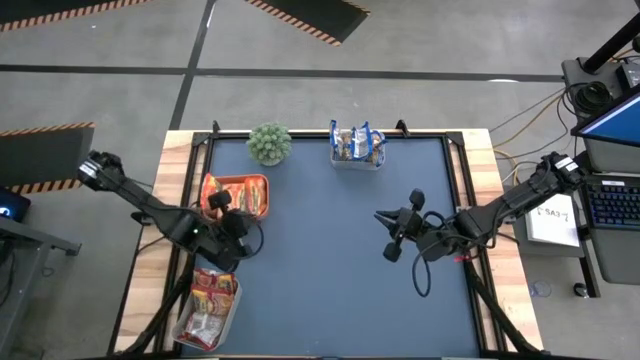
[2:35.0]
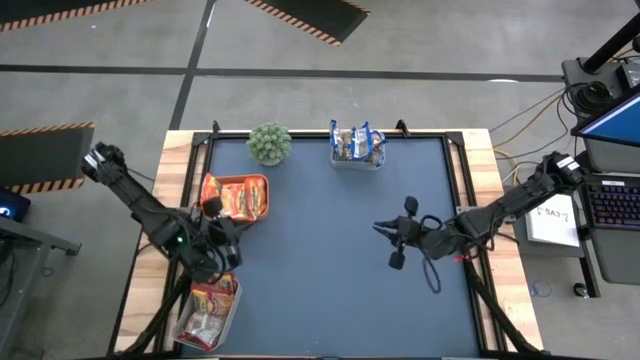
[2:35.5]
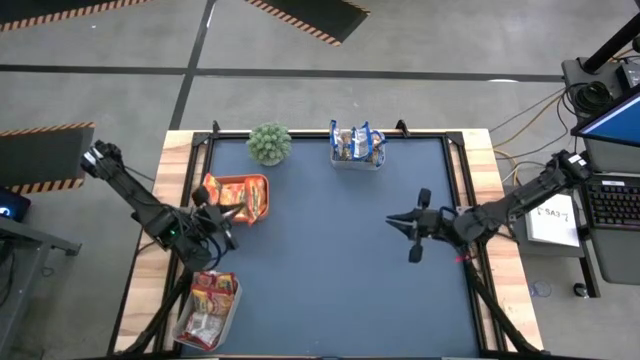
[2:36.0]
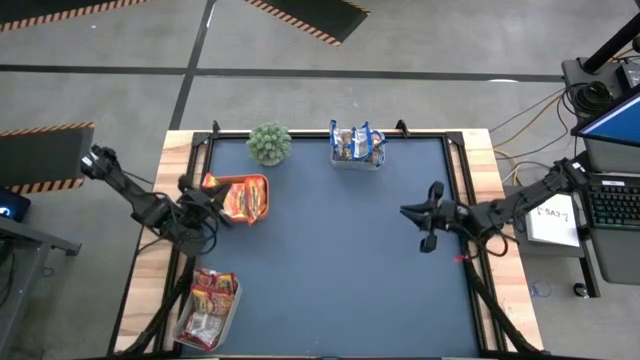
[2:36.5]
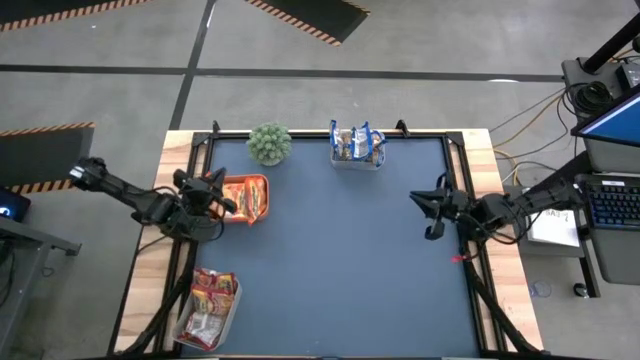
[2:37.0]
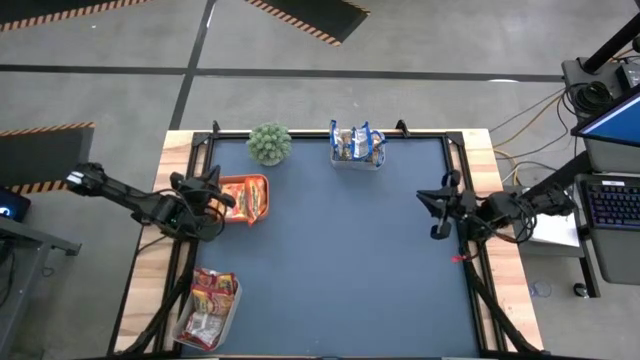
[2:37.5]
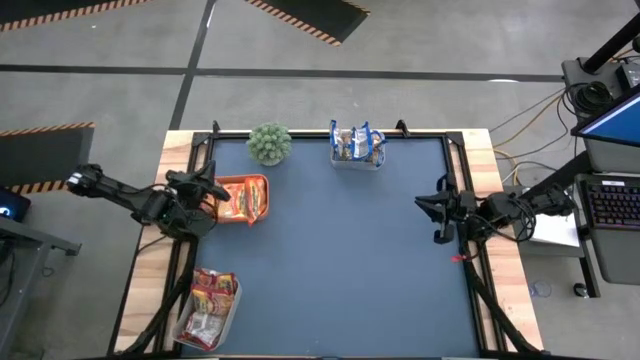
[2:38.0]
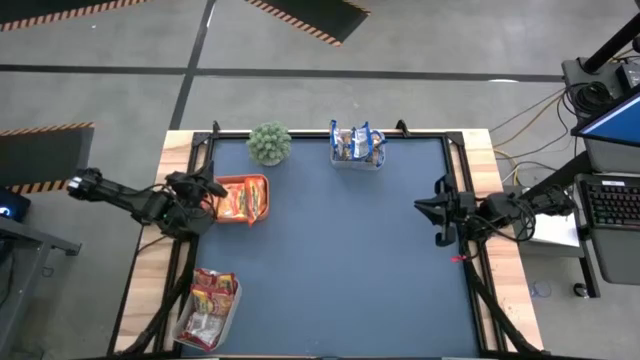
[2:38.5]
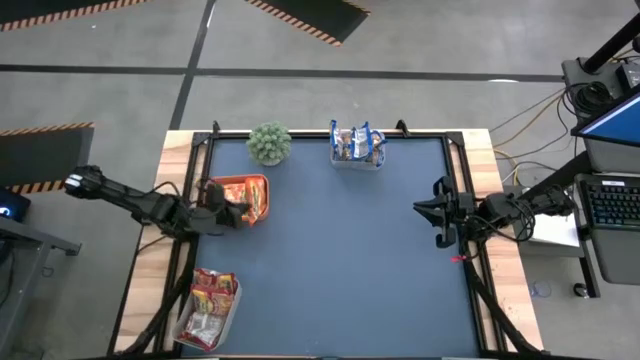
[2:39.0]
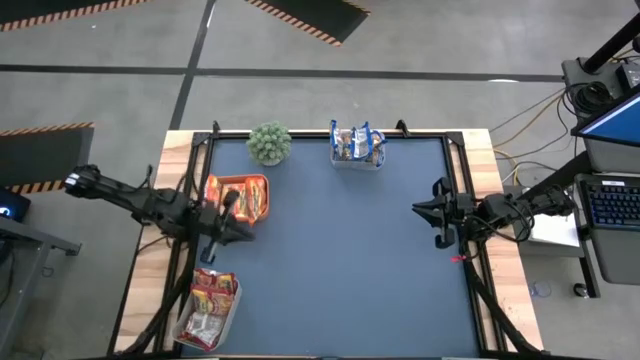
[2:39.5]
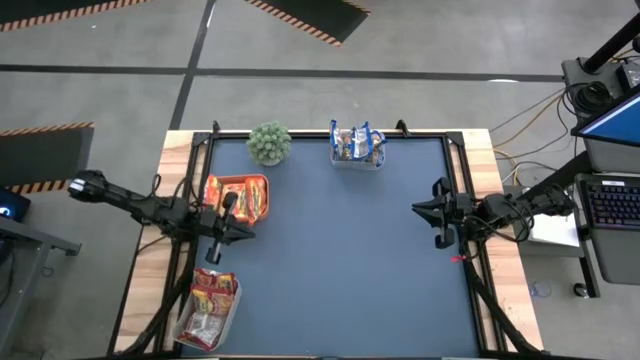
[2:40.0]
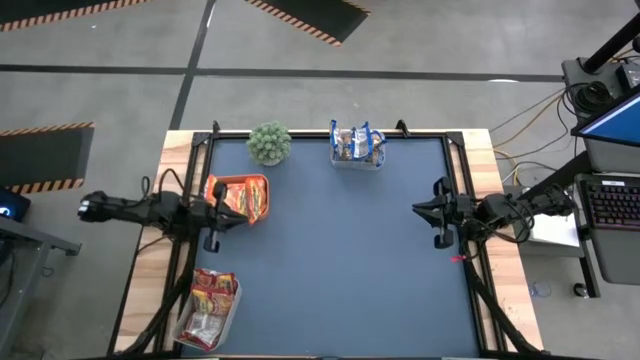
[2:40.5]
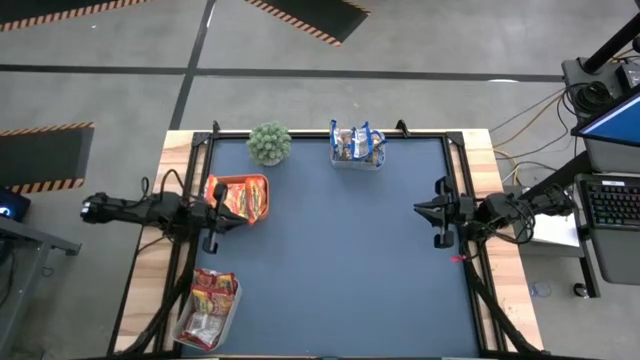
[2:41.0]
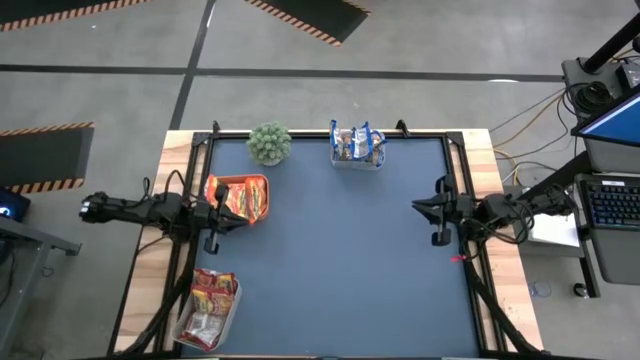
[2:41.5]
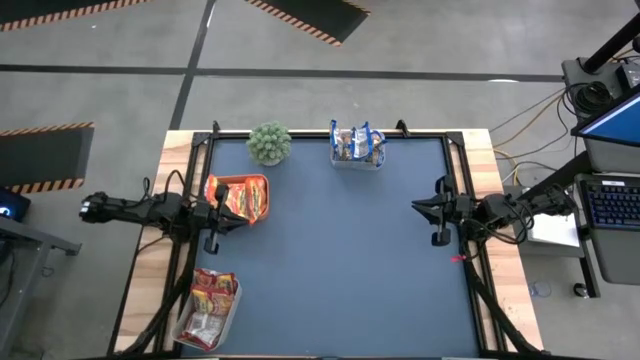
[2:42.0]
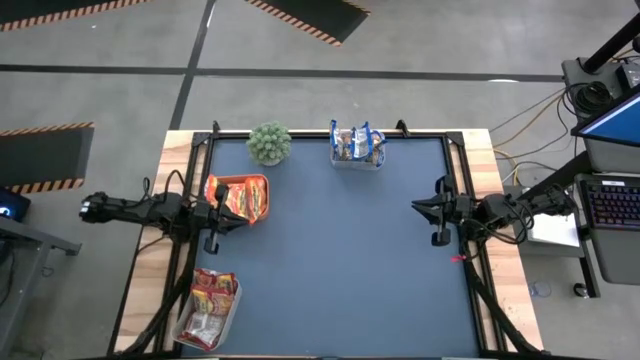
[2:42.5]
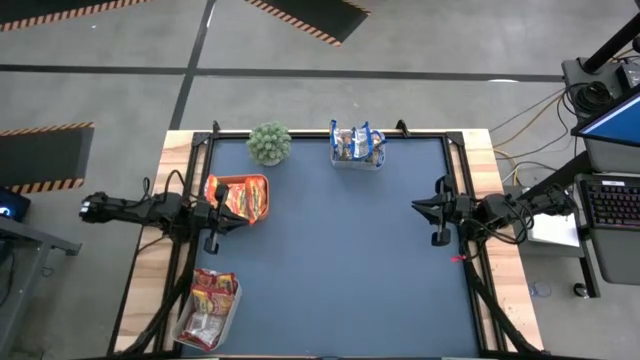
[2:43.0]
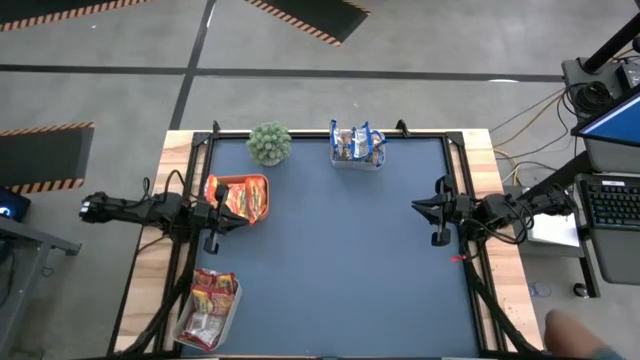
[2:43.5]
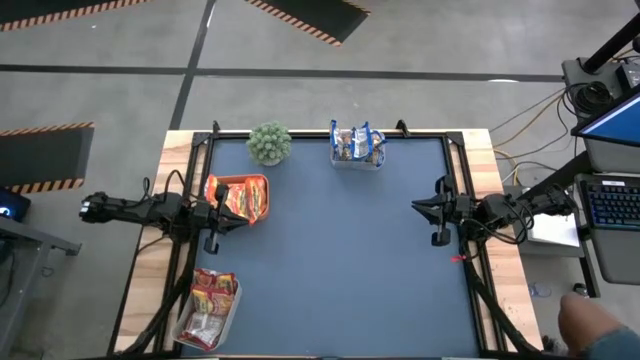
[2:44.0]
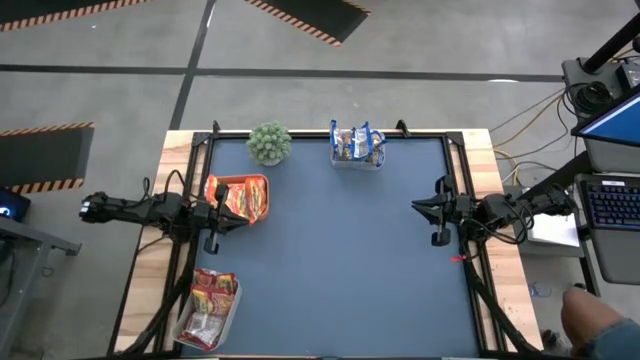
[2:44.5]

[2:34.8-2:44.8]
Task: Sort Maruchan noodles
Return to Home Position

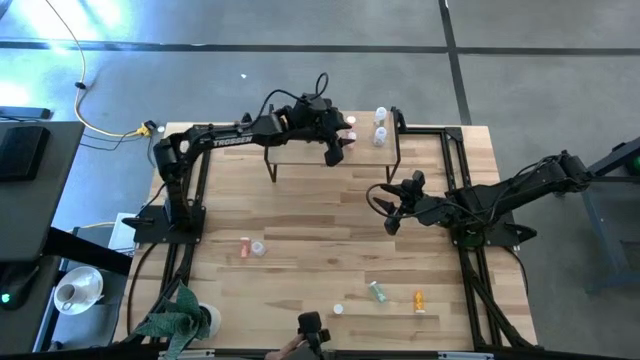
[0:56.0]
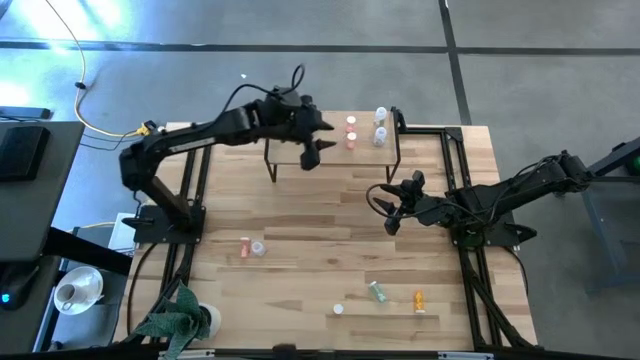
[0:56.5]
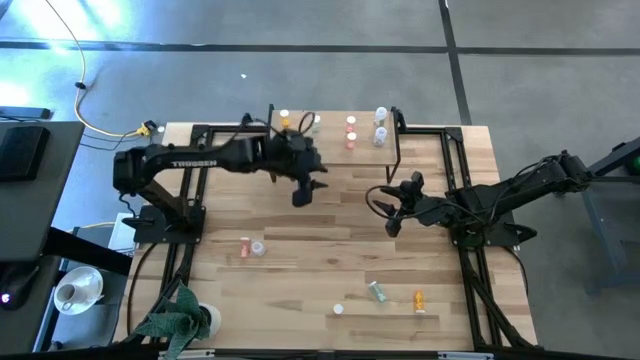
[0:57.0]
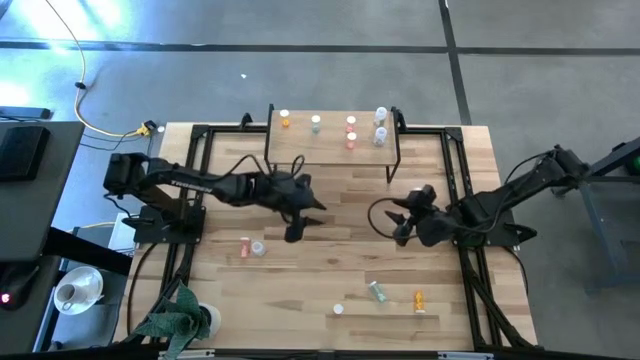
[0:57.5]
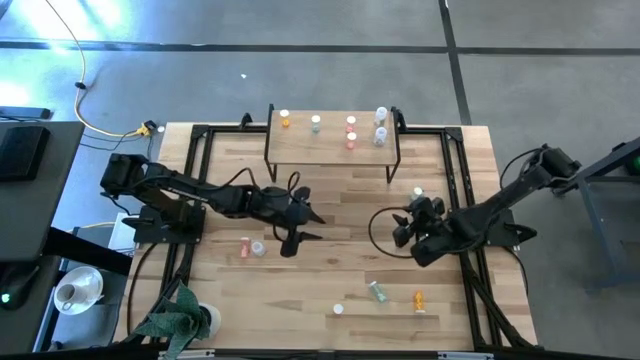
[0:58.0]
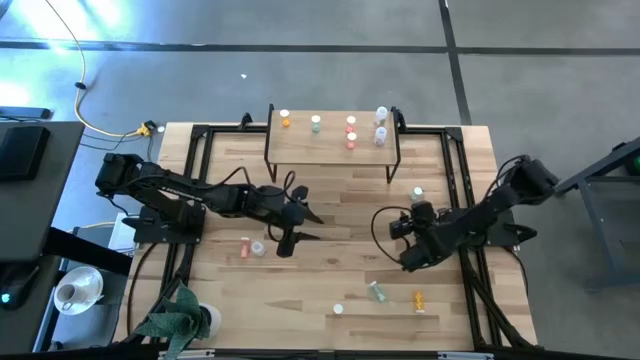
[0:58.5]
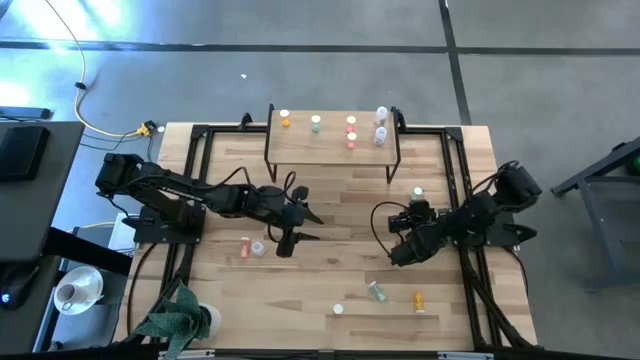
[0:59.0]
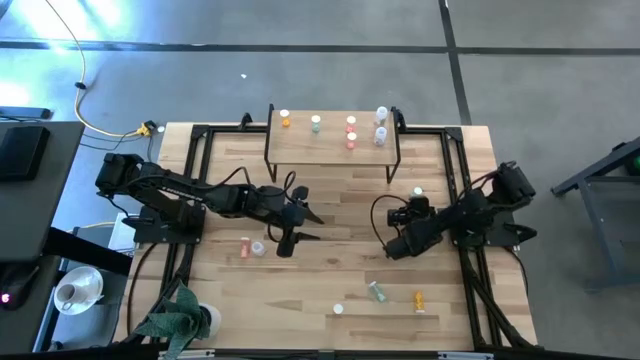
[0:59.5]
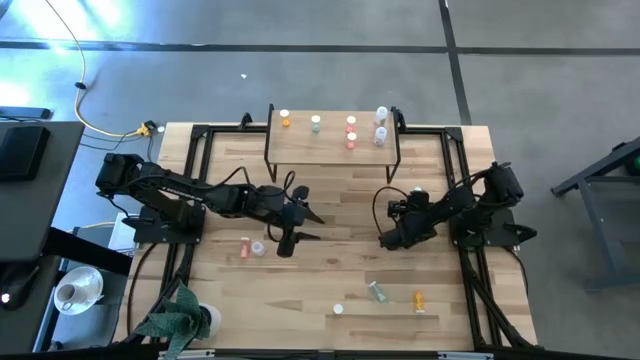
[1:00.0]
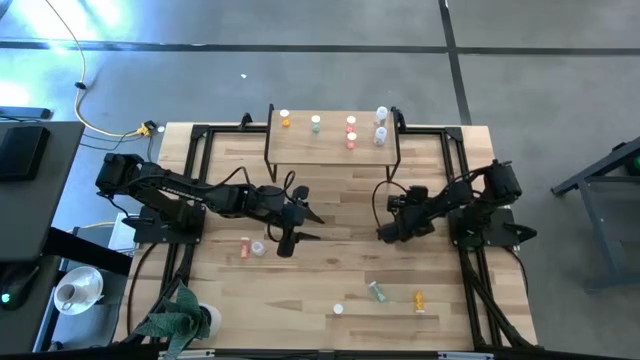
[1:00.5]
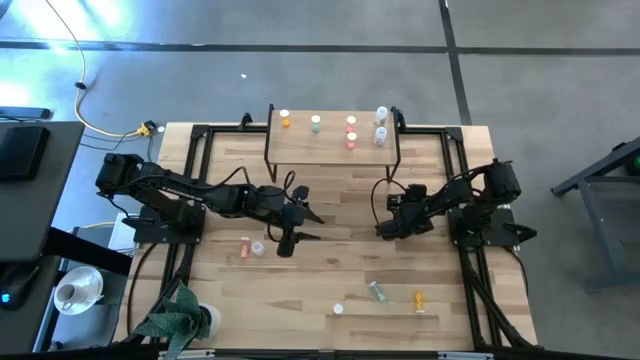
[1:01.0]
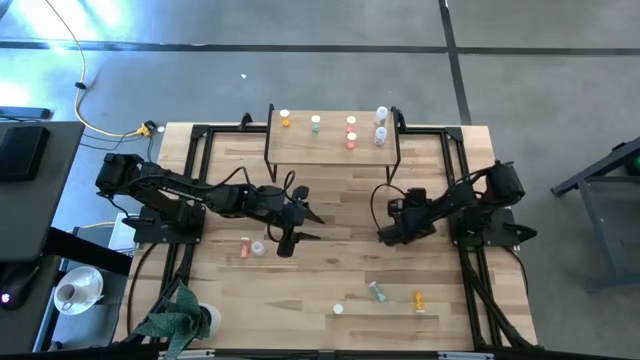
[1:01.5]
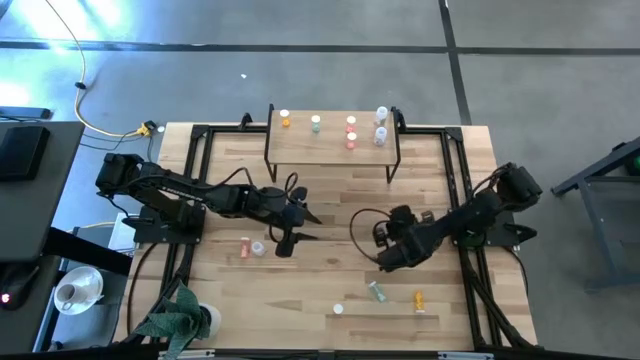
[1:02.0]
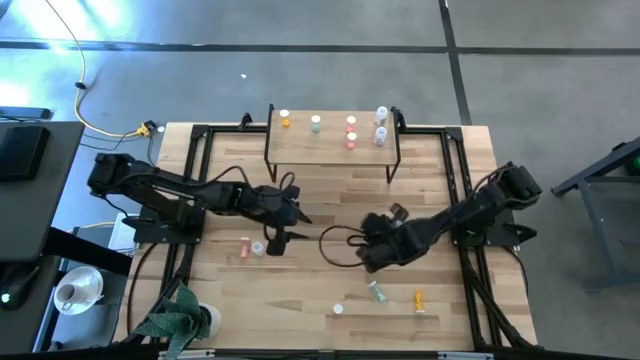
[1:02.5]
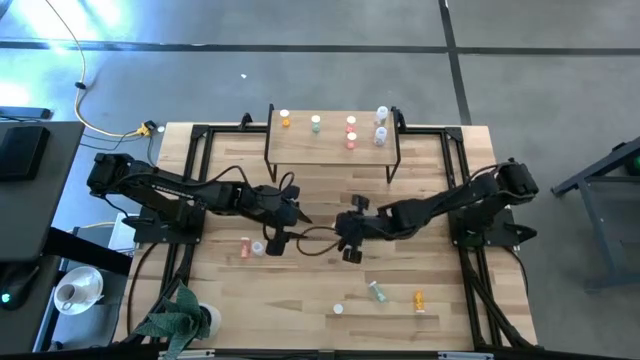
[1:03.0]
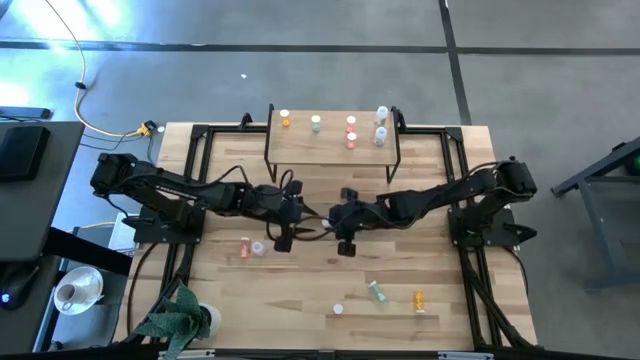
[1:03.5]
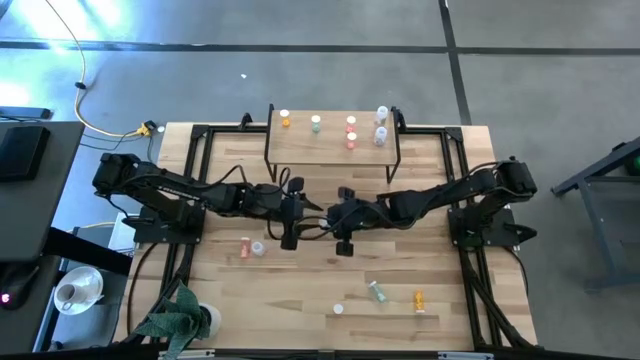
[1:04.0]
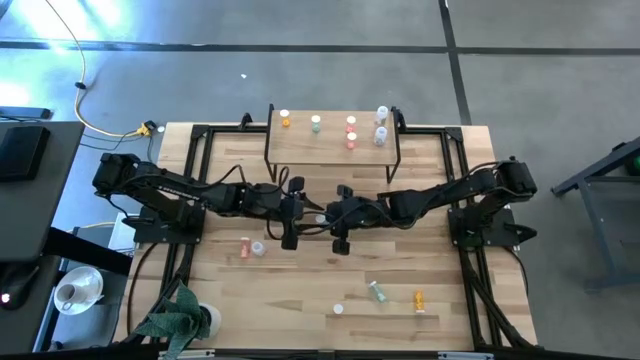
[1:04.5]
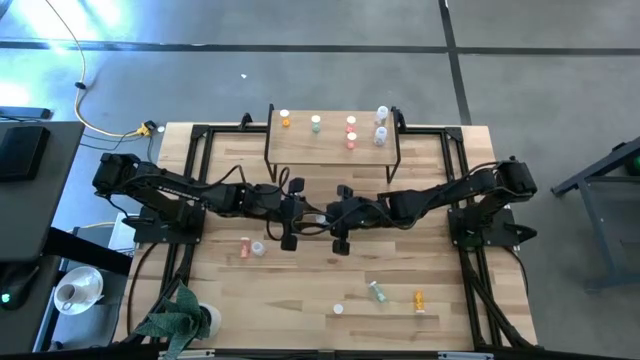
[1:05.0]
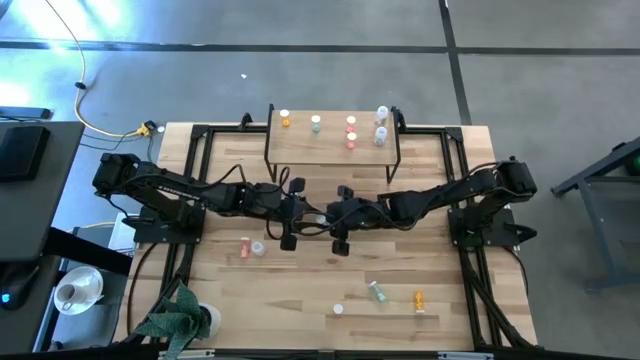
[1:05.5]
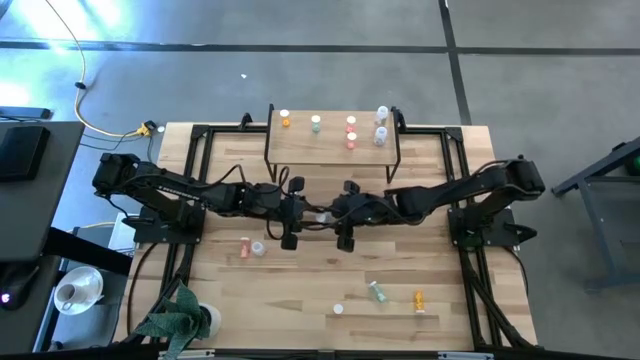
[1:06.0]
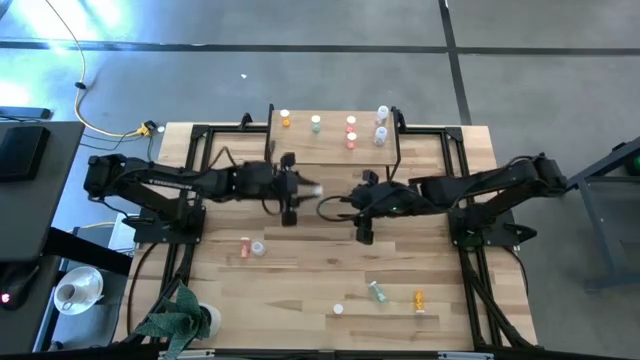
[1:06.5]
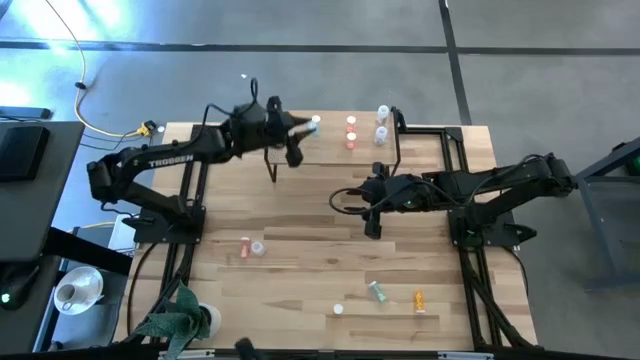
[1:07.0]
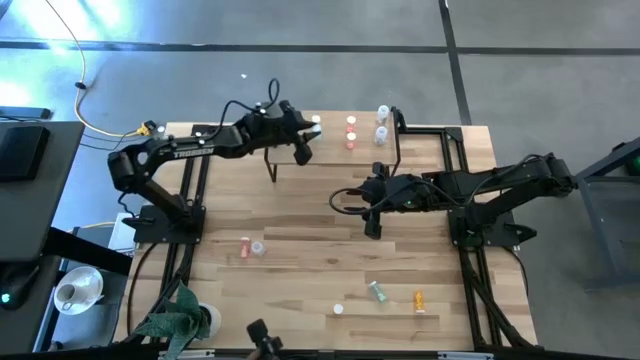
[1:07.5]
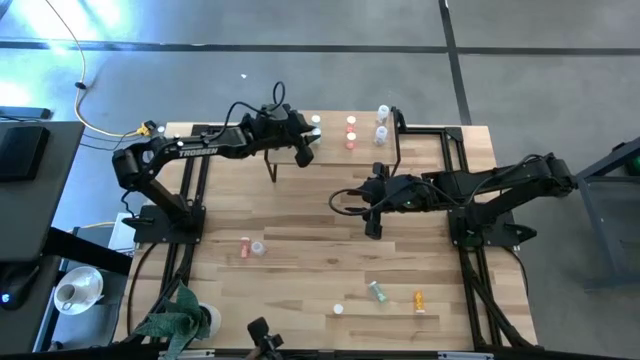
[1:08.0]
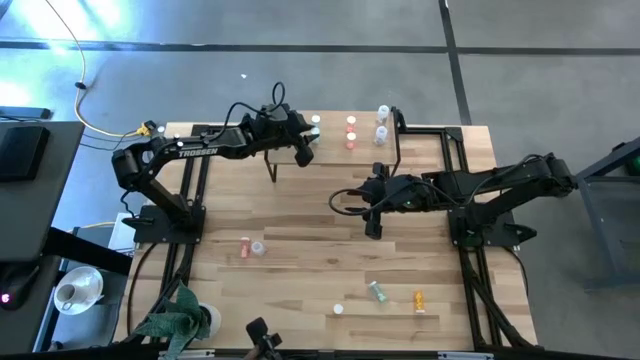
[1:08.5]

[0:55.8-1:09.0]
Task: Pick and place medicine bottles onto shelf by color
Put the top blue pill bottle on the shelf
